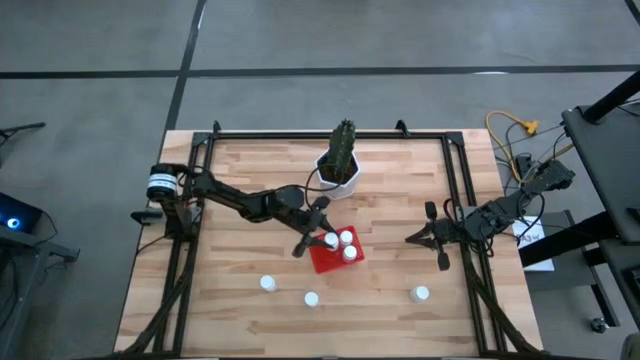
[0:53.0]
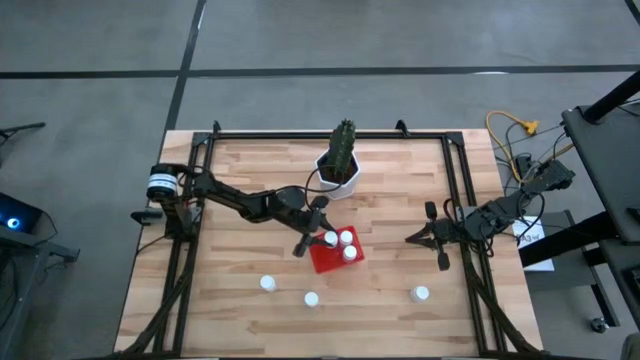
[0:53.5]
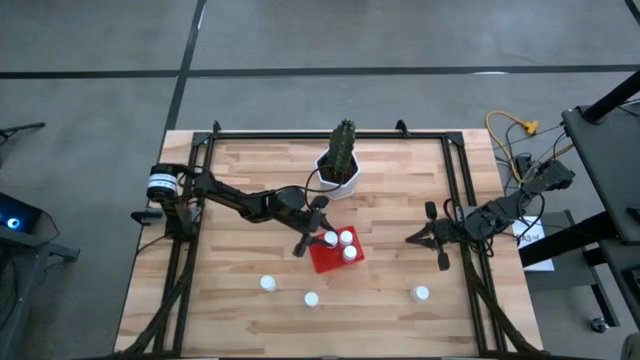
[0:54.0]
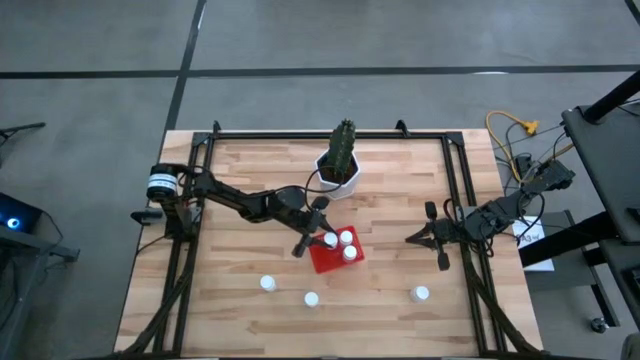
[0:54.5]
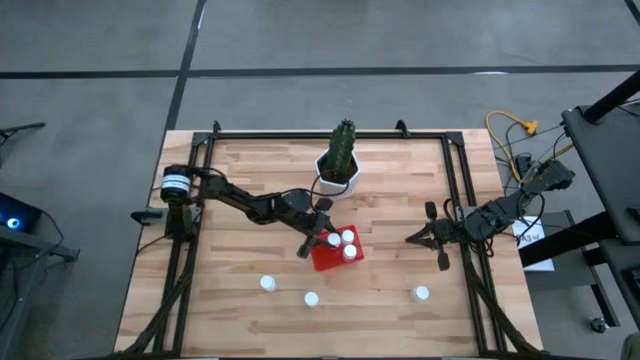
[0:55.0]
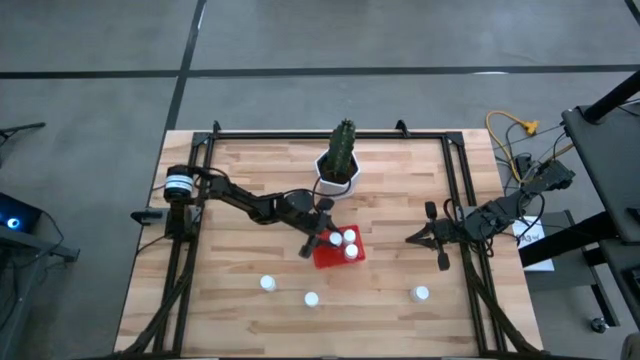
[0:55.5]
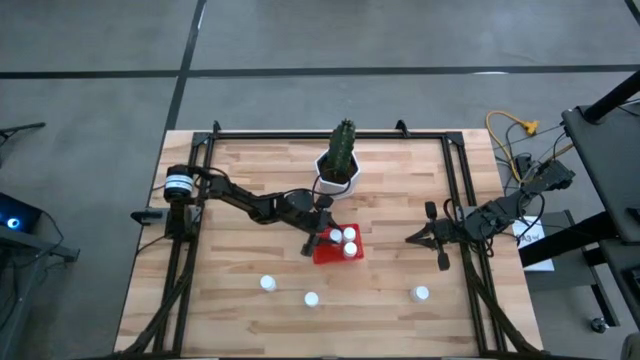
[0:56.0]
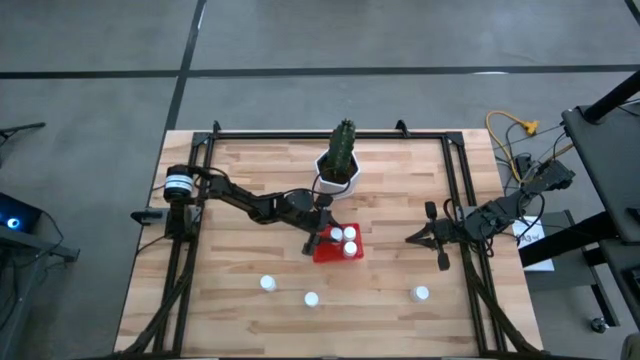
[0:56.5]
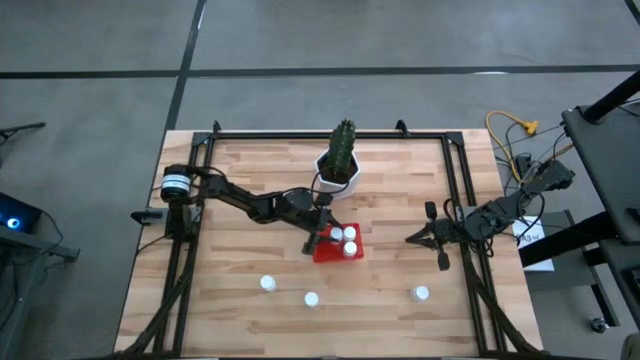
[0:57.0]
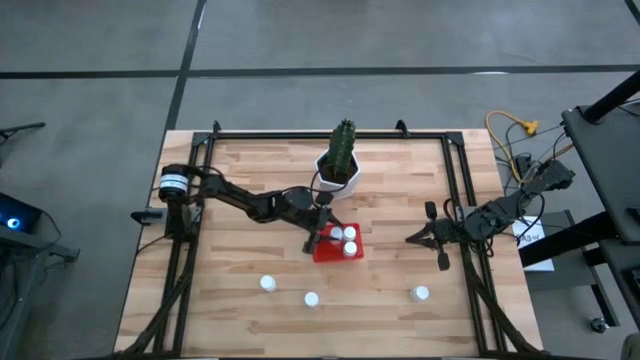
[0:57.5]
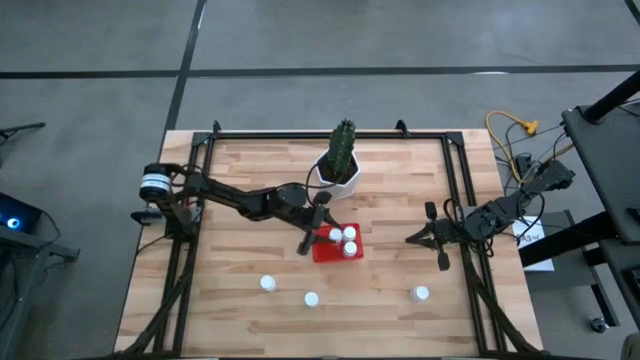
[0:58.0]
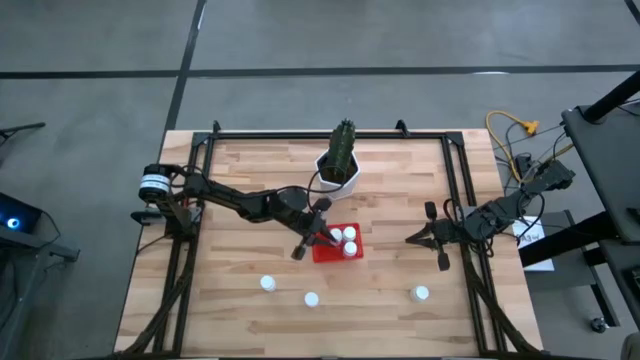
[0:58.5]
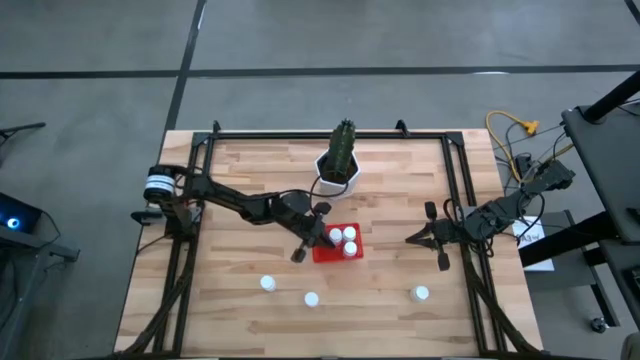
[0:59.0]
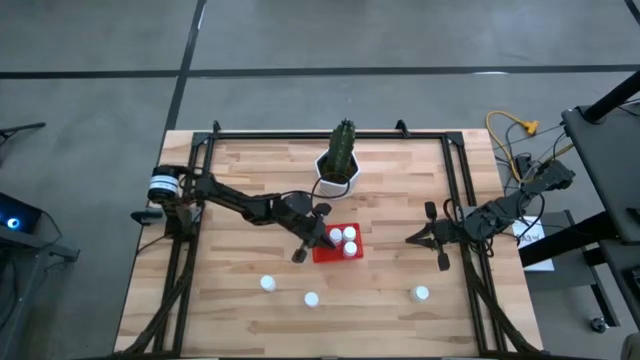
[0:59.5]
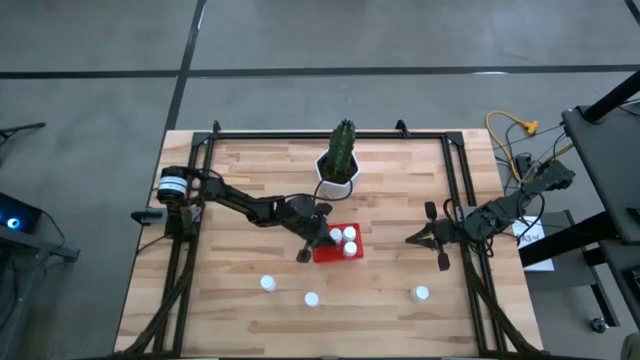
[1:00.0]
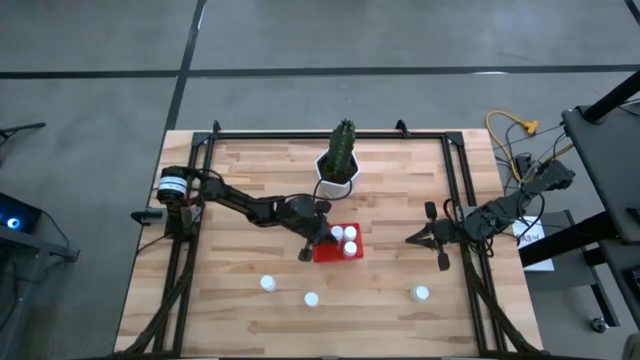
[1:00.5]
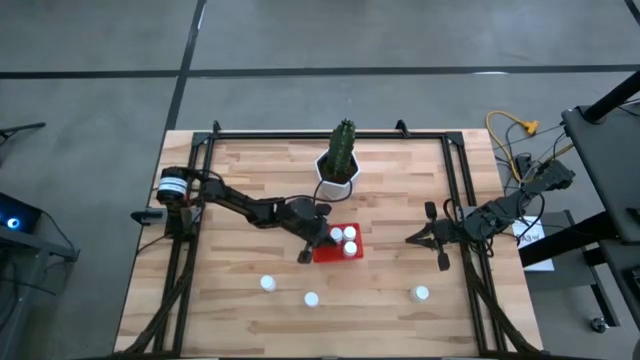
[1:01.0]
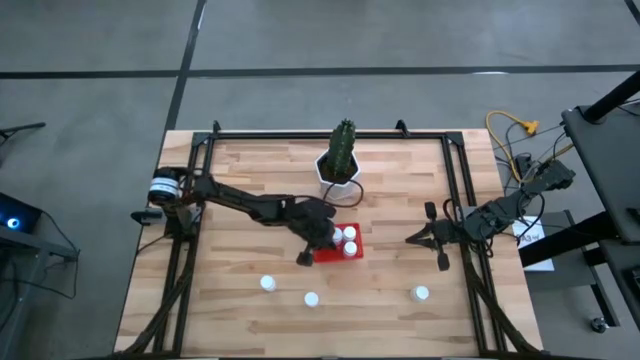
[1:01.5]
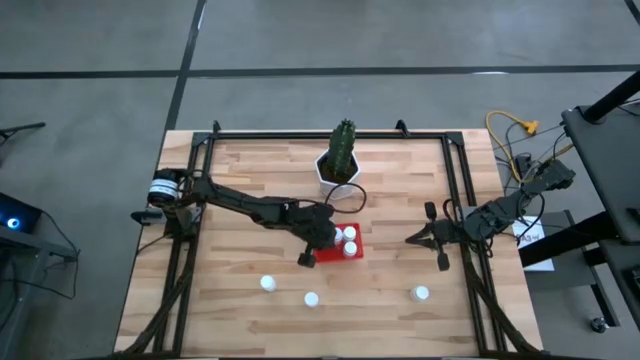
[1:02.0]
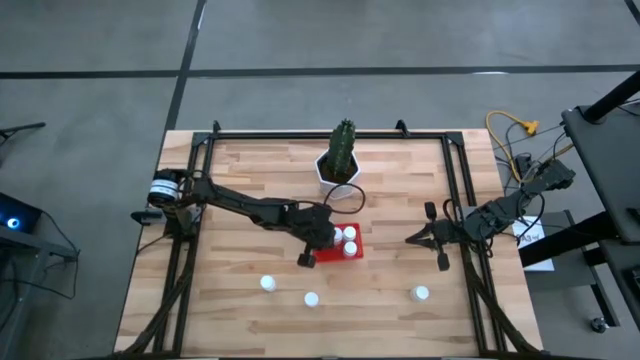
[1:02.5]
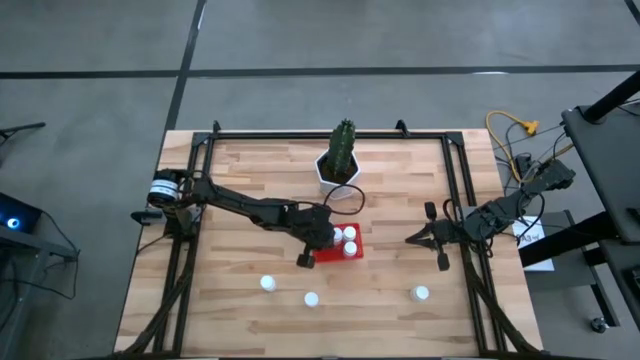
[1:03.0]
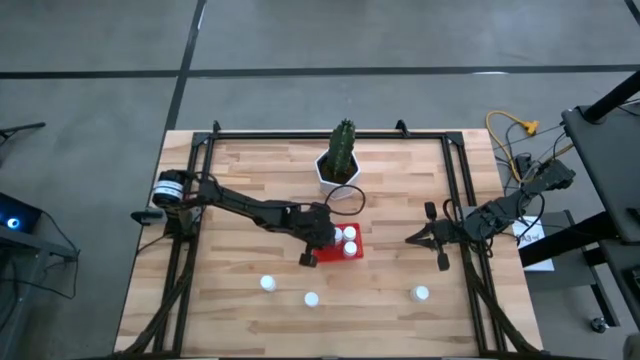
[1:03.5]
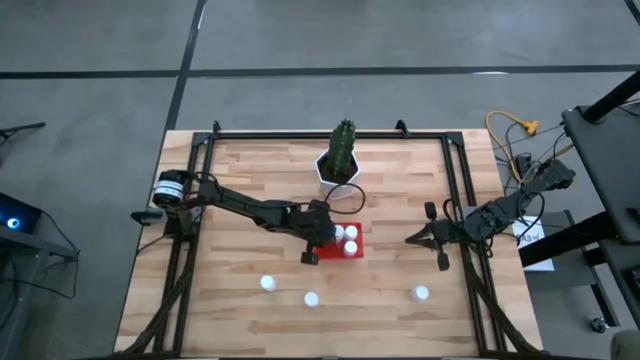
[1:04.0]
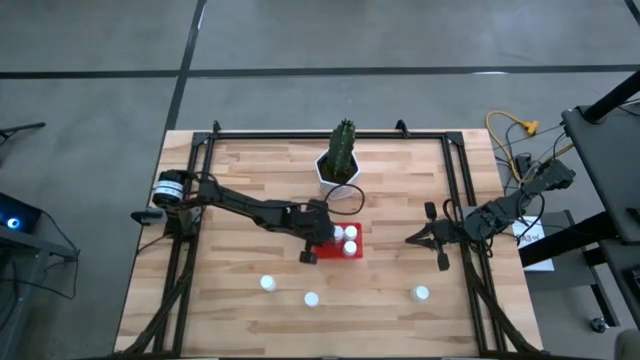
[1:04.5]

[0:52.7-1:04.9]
Task: Pick and place pill bottles into a basket
Put the white pill bottle into the red bin

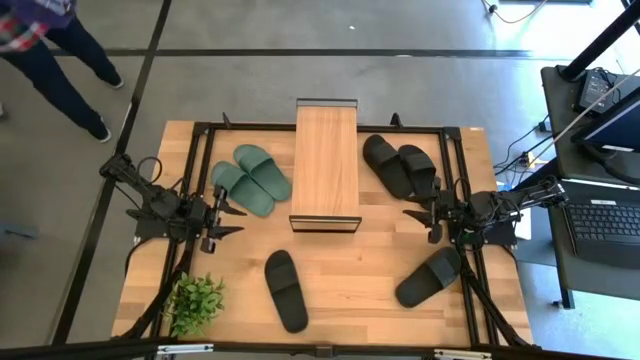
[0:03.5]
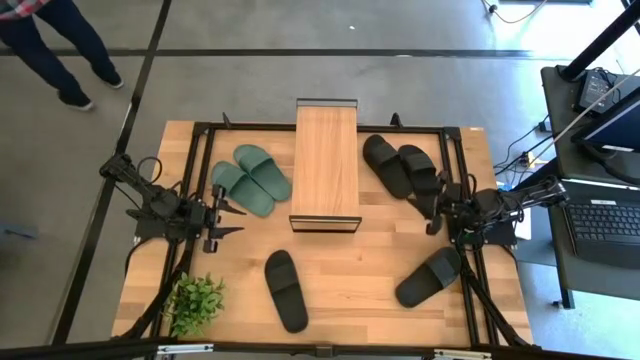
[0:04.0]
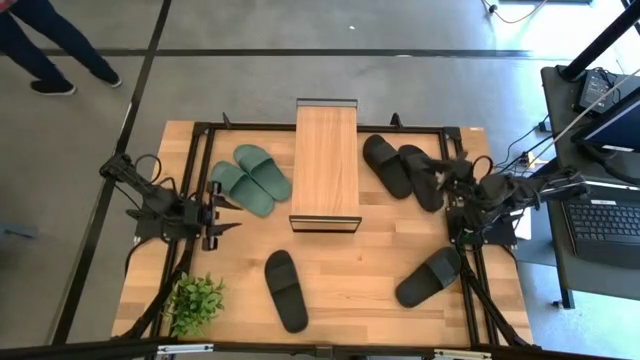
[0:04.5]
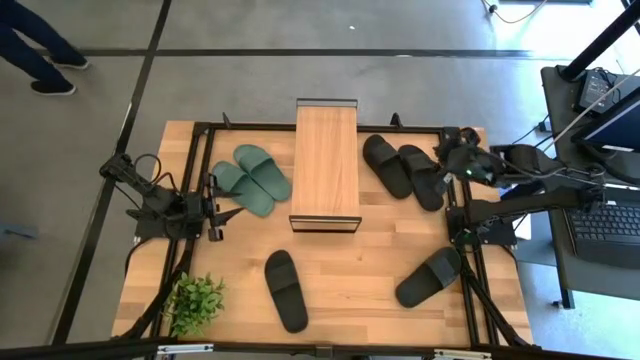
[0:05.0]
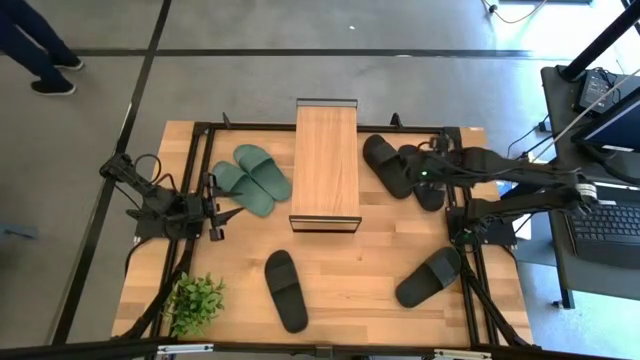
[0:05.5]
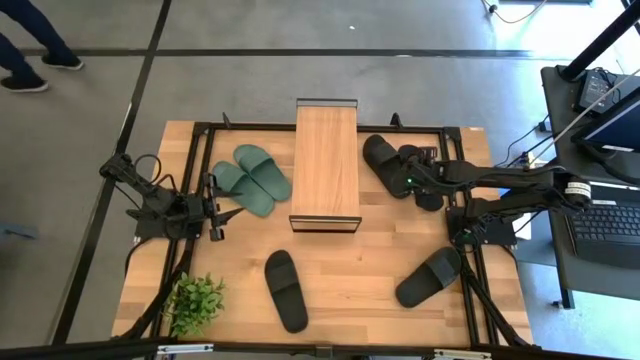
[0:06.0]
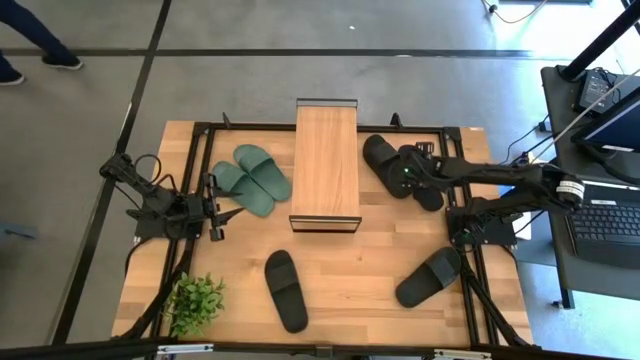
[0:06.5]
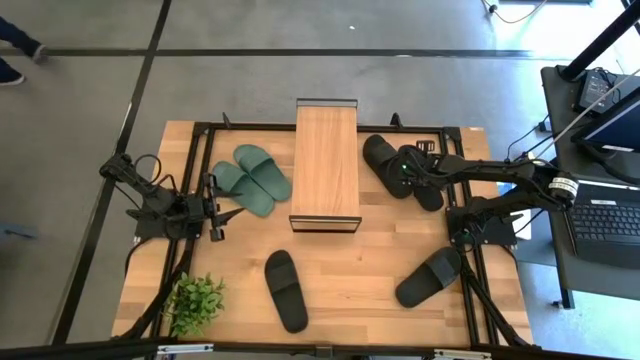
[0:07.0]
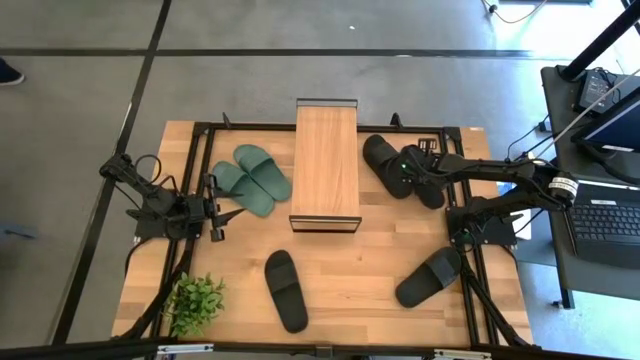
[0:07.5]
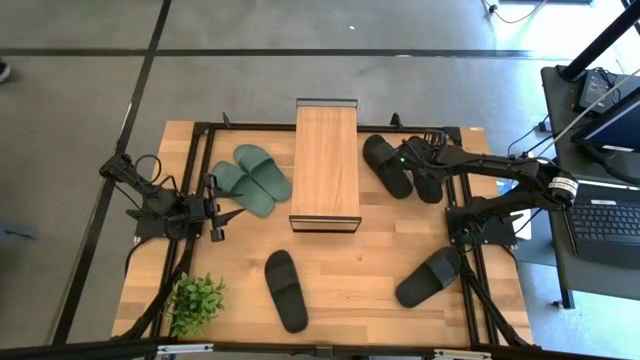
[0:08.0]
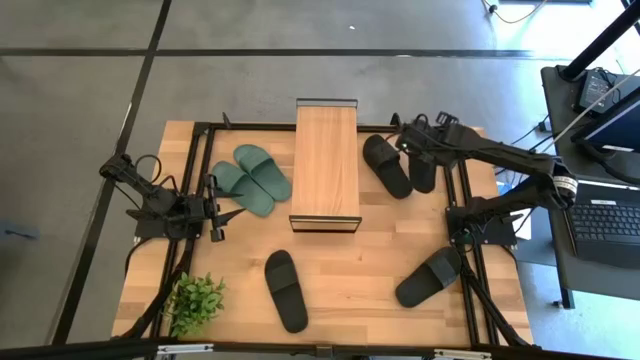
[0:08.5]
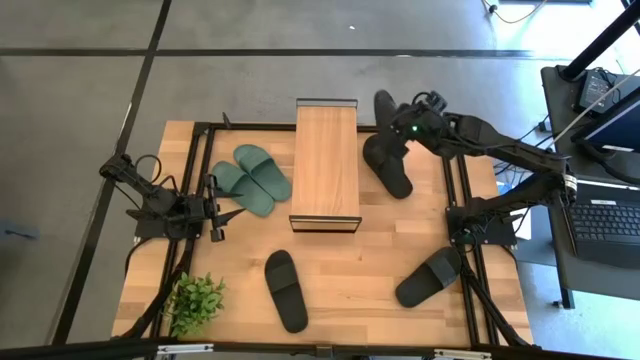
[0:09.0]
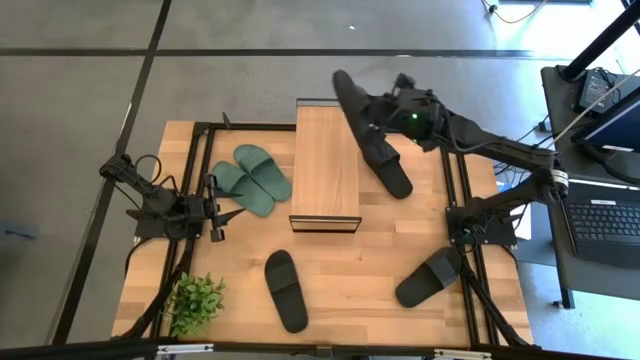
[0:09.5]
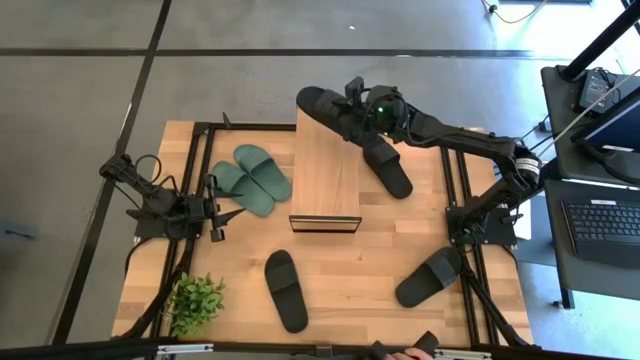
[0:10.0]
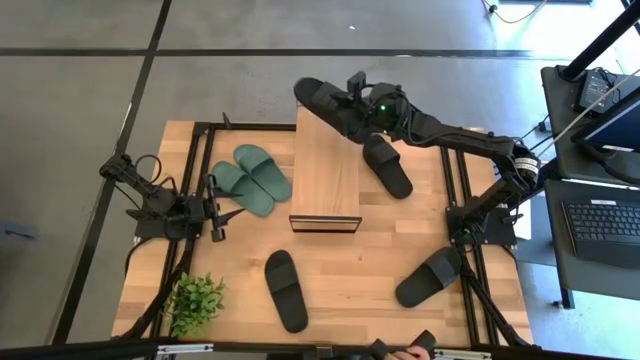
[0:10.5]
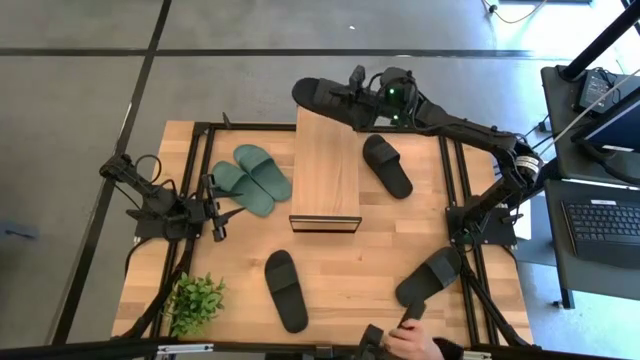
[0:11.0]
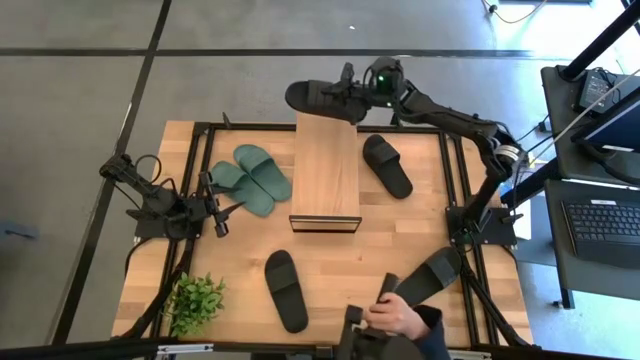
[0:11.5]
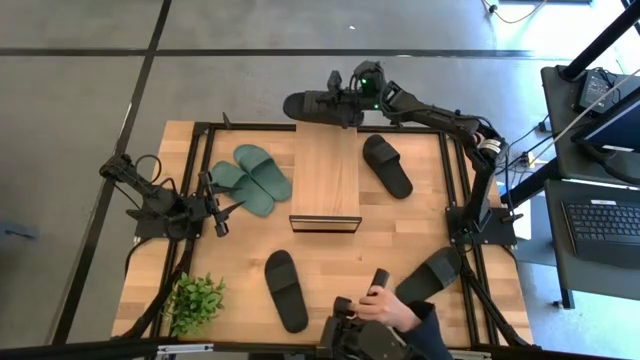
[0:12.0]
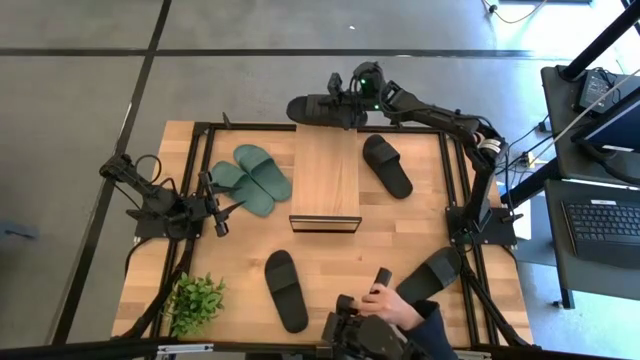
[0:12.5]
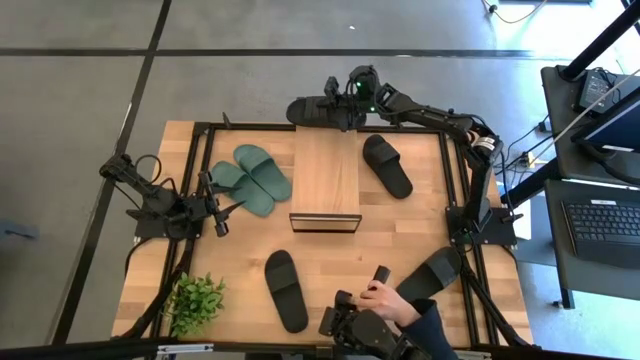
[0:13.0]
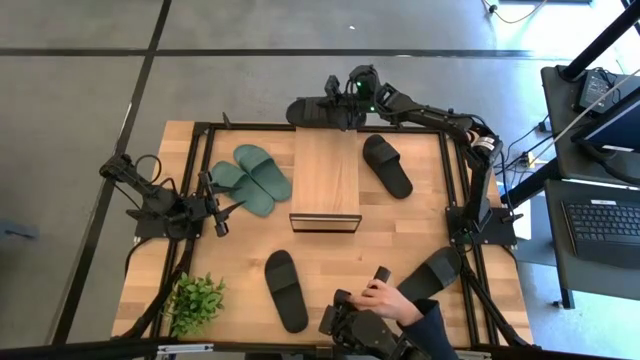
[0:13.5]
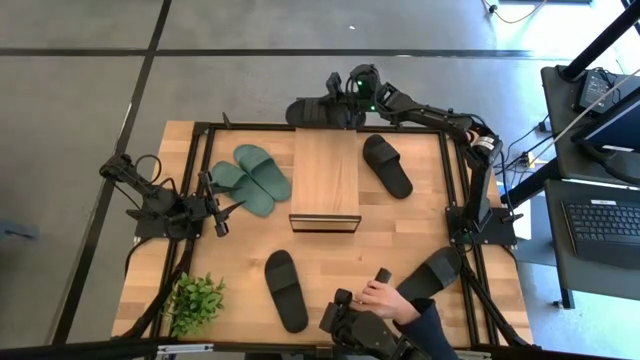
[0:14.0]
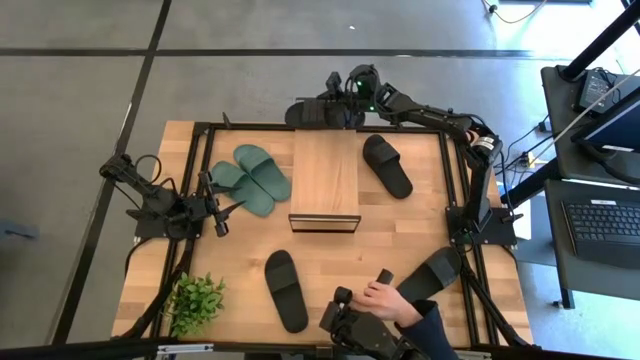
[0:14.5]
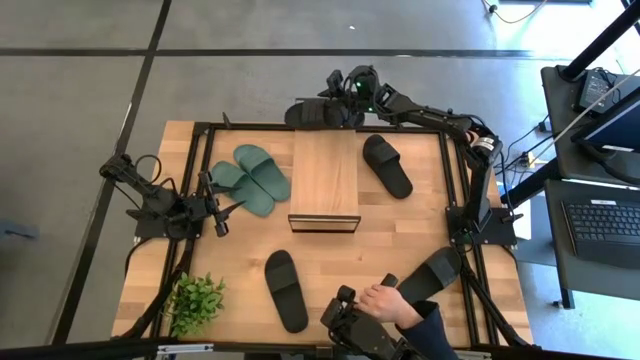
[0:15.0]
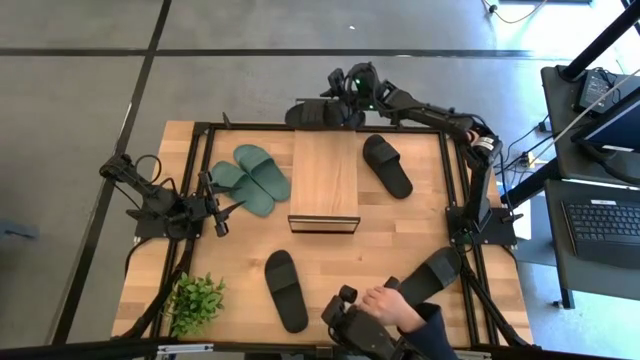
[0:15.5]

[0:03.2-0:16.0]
Task: Pick and place slides into the shelf
Put the black slide on the shelf
